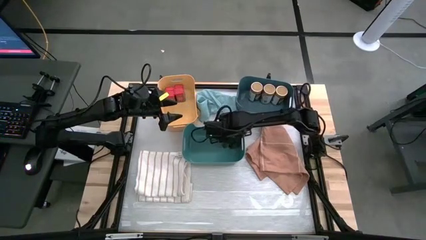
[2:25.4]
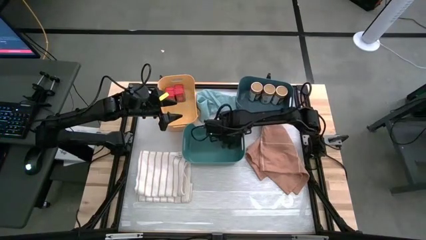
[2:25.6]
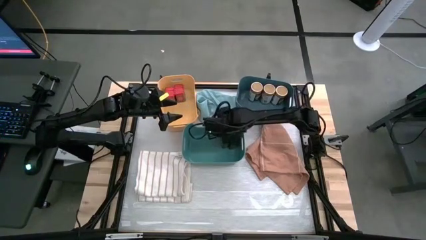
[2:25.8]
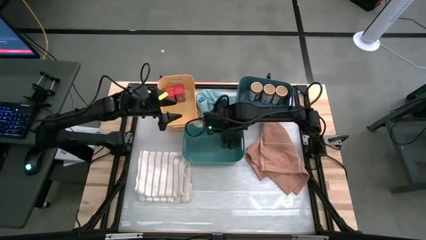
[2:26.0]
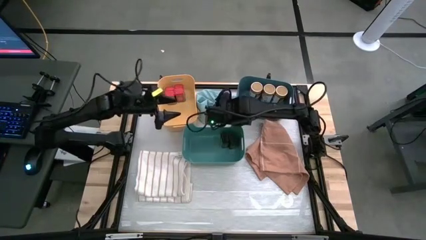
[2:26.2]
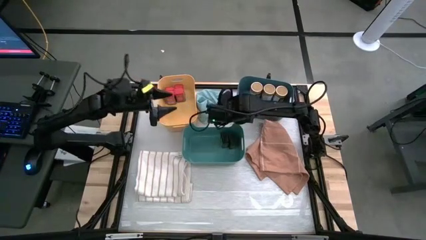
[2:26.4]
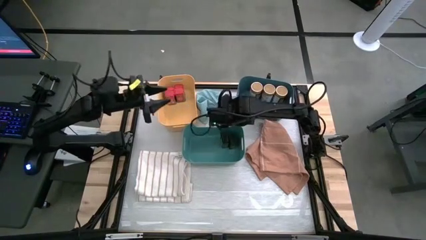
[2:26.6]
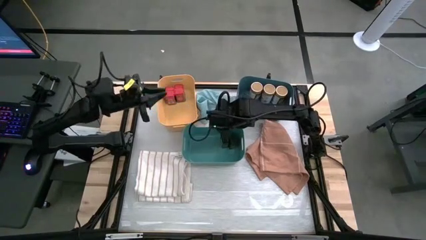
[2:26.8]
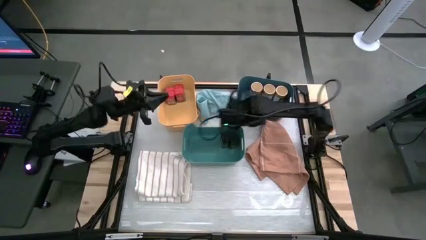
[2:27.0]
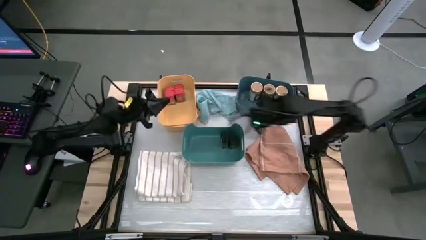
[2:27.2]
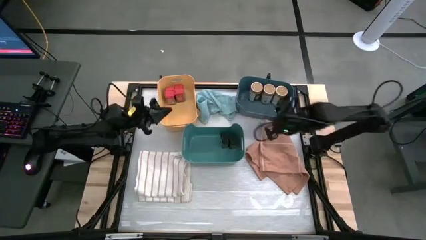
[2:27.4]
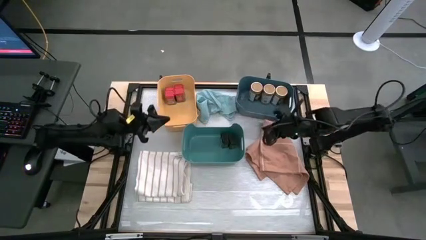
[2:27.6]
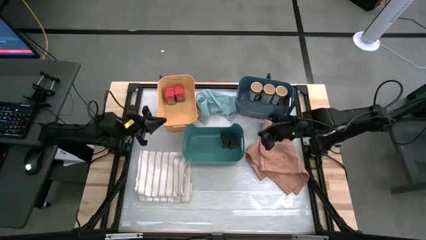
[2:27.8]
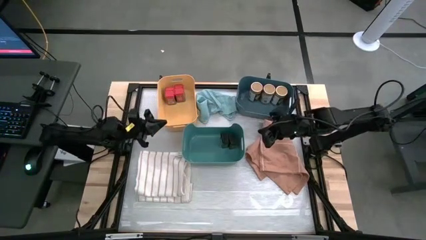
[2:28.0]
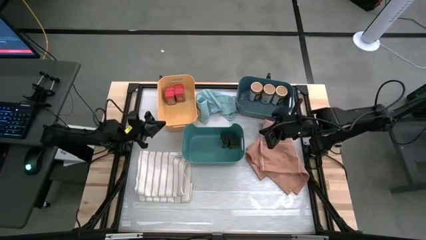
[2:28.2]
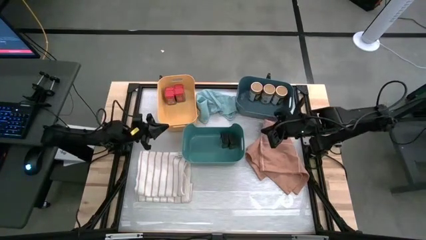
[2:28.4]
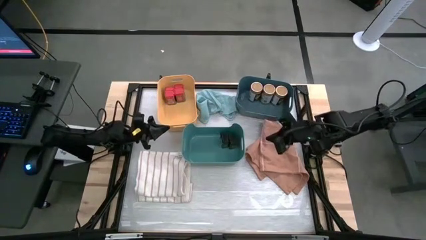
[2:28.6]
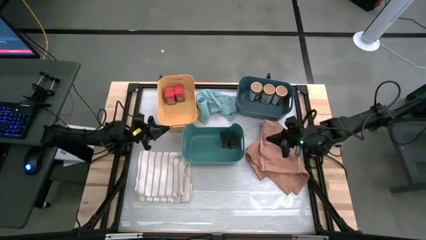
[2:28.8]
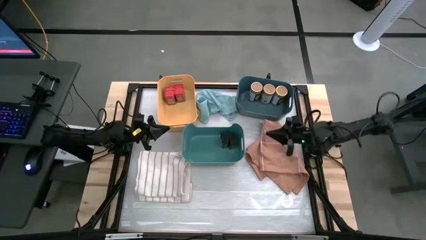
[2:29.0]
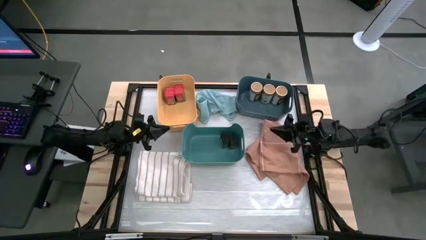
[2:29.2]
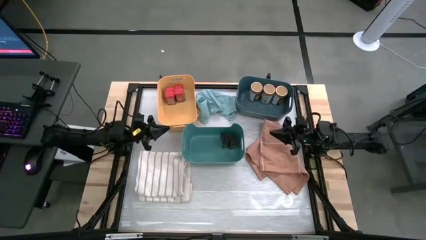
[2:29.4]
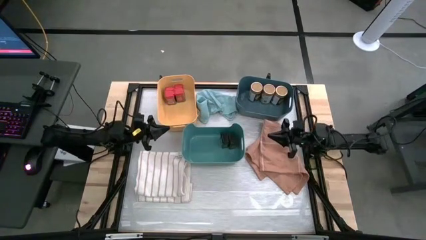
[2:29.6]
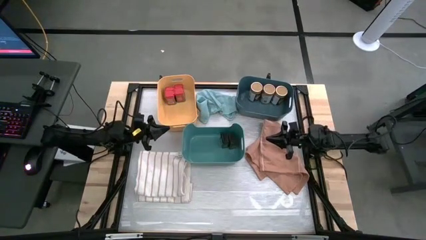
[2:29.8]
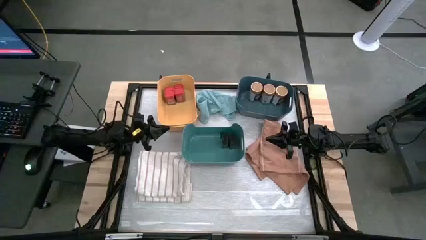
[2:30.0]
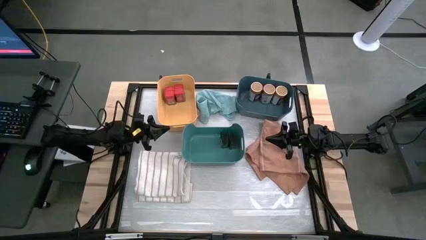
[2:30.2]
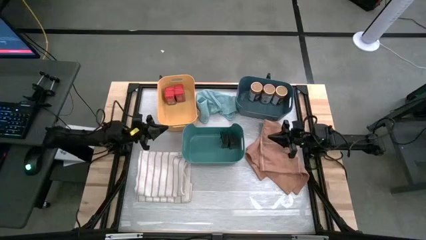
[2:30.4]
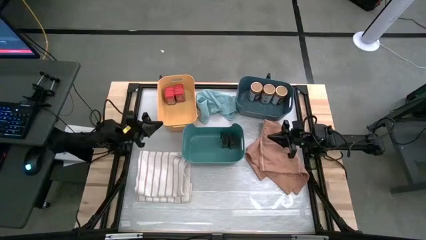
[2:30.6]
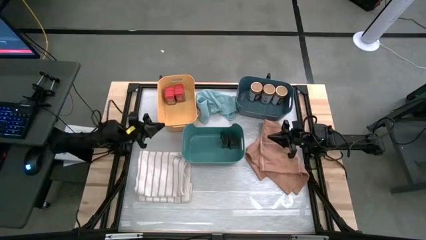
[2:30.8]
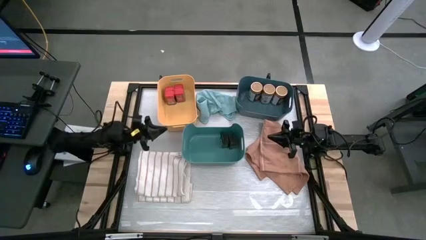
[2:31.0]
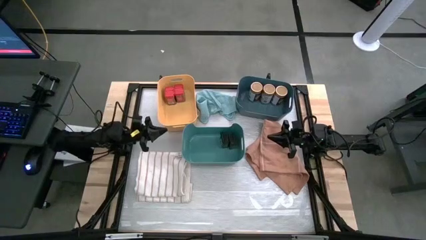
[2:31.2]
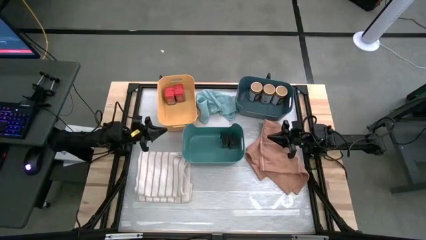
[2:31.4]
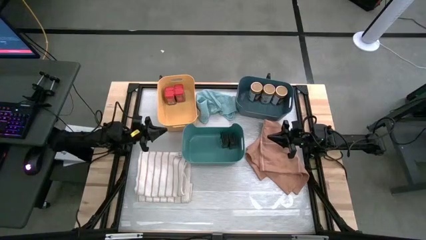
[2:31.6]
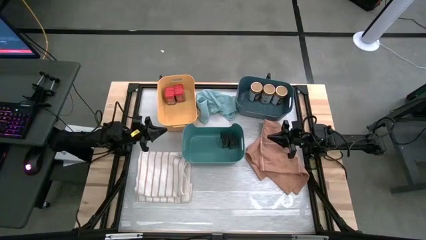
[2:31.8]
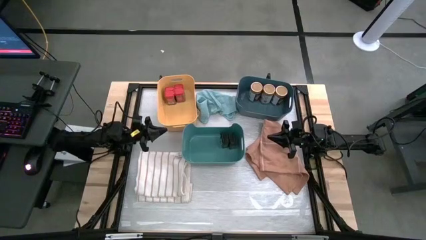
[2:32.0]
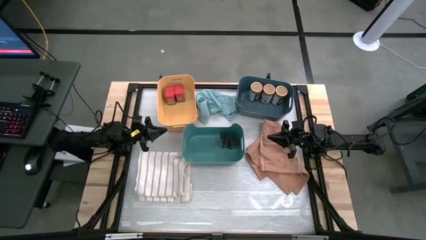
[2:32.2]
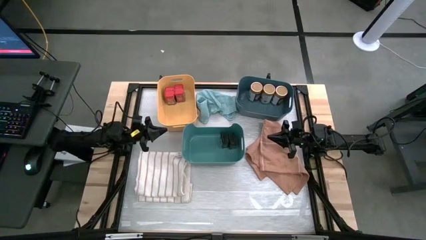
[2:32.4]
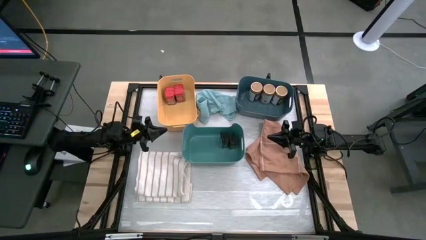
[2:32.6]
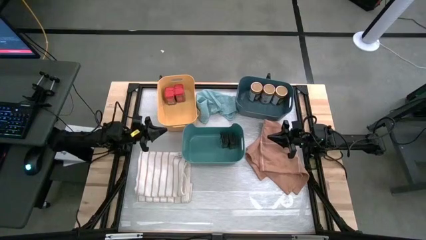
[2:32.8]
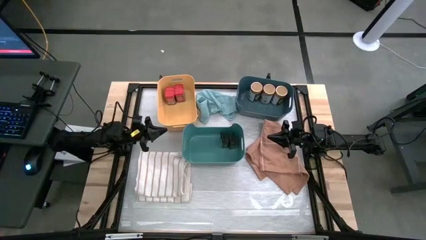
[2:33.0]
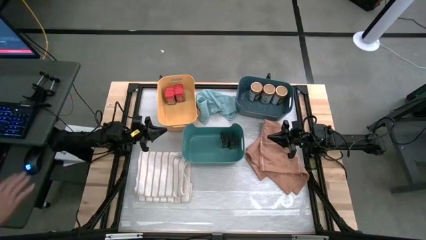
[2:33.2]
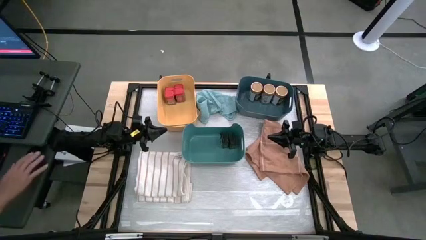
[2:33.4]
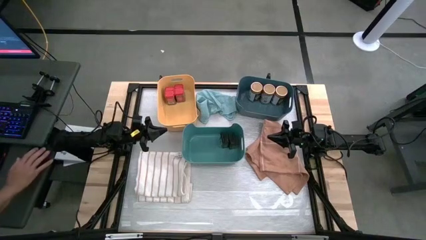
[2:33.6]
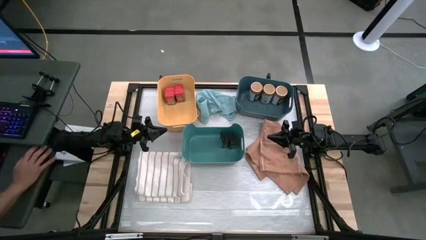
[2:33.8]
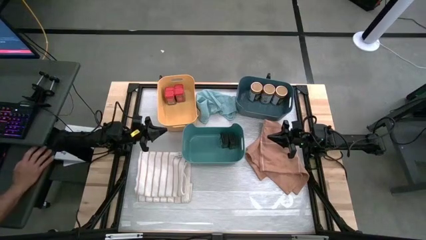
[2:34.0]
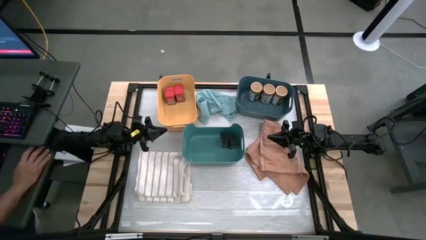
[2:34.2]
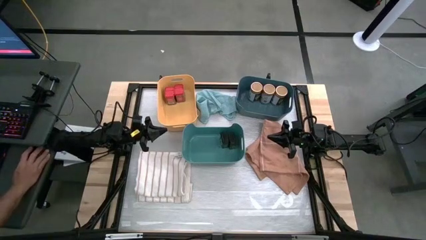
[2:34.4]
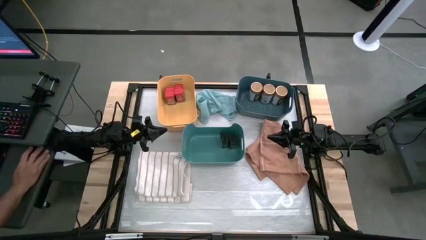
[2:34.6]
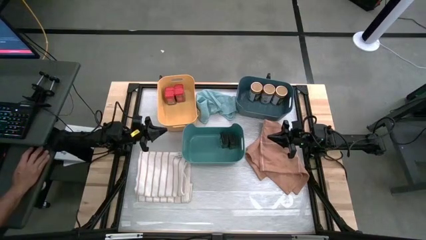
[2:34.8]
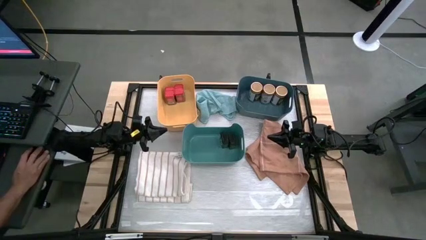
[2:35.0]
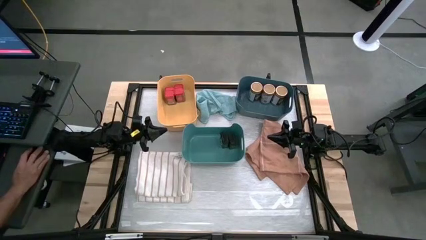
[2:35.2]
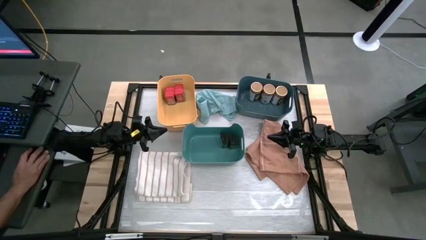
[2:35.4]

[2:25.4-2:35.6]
Task: Sort spices by type
Return to Home Position
